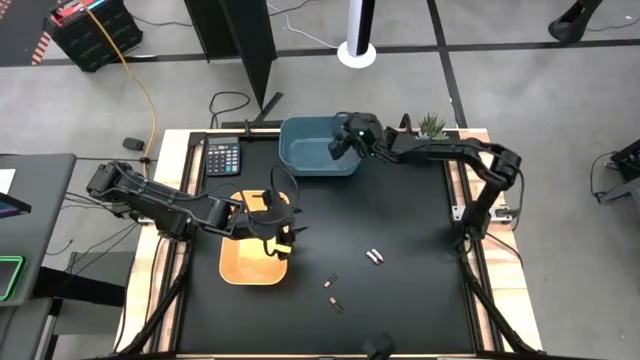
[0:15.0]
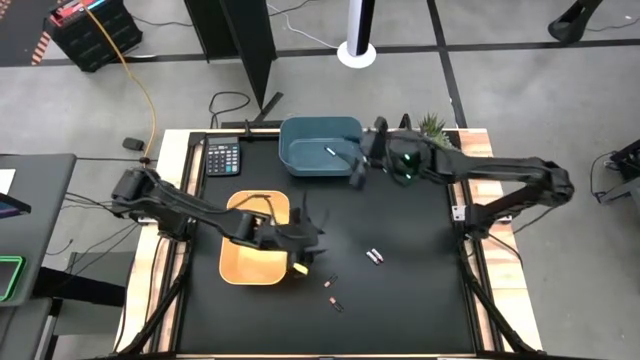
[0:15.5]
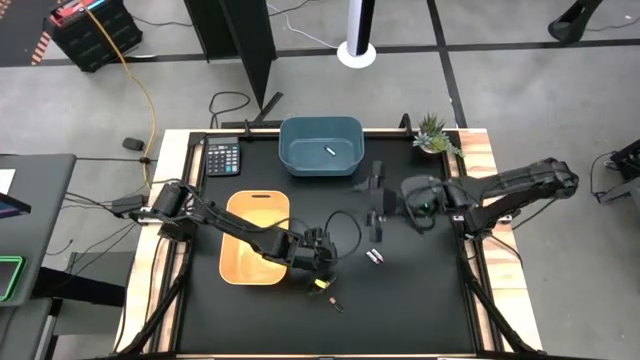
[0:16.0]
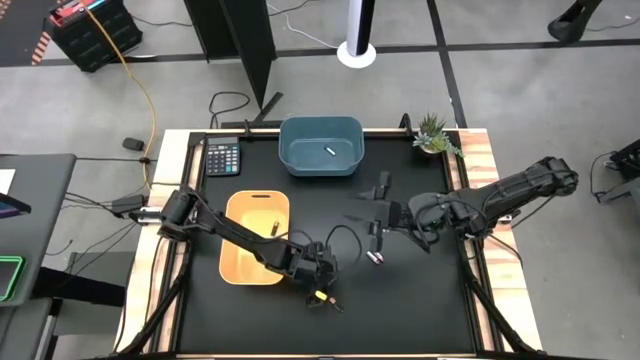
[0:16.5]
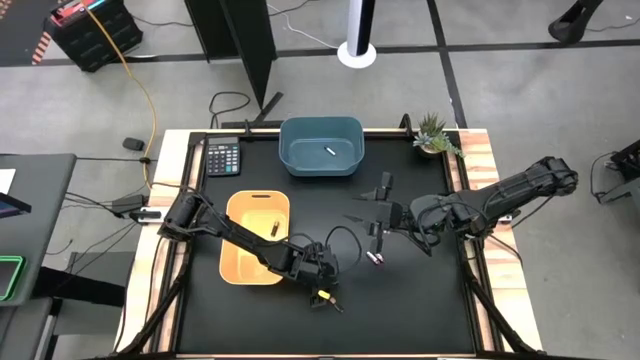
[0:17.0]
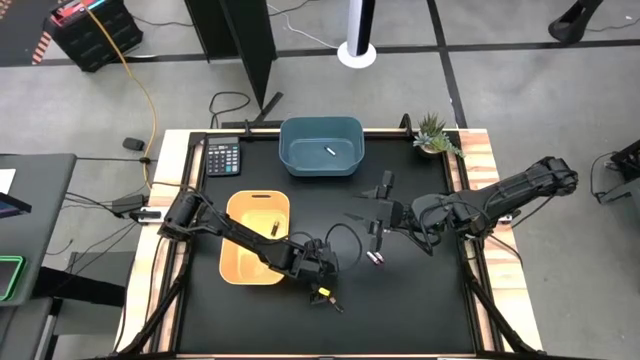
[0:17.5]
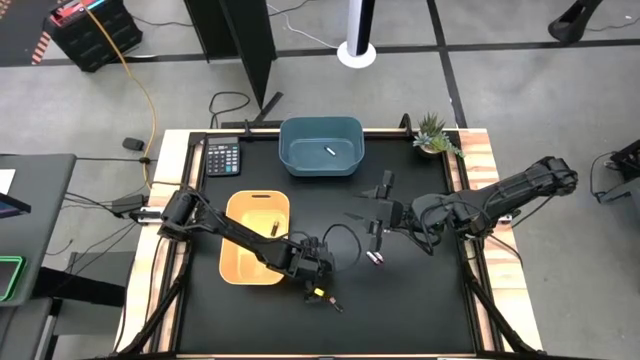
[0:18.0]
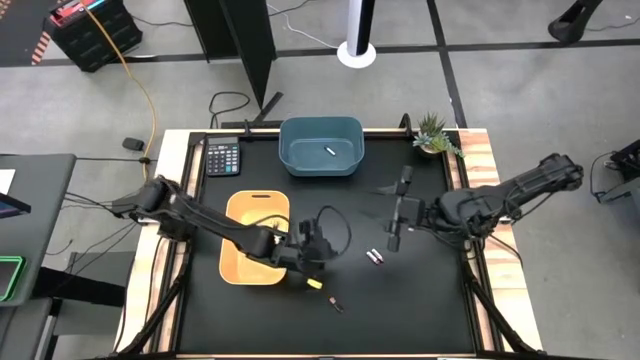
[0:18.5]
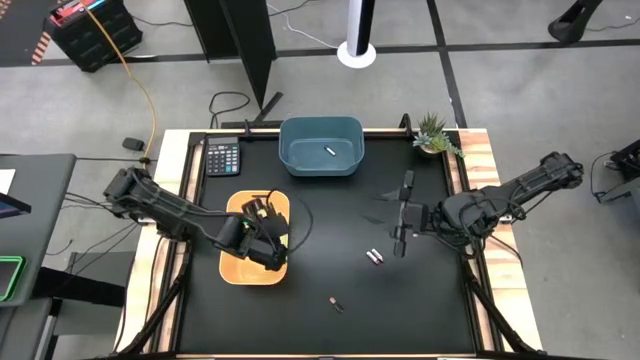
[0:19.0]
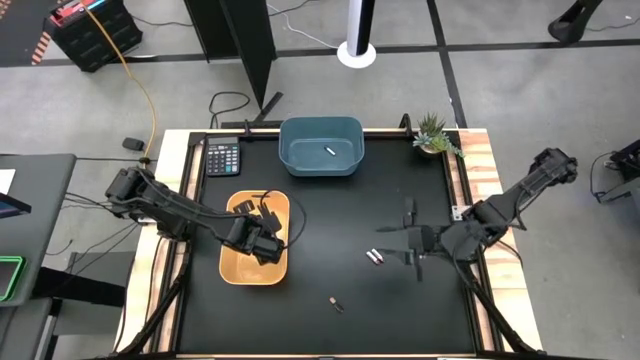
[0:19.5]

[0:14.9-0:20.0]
Task: Sort batteries
Put the top black battery into the orange bin

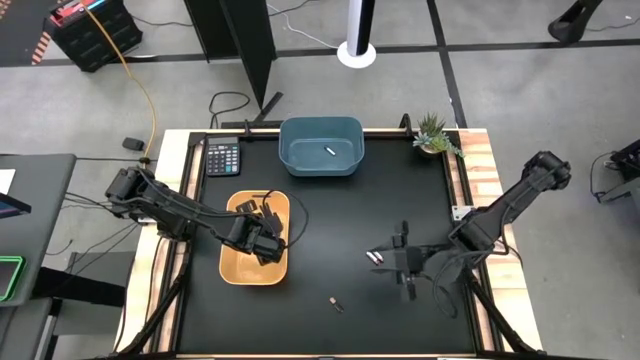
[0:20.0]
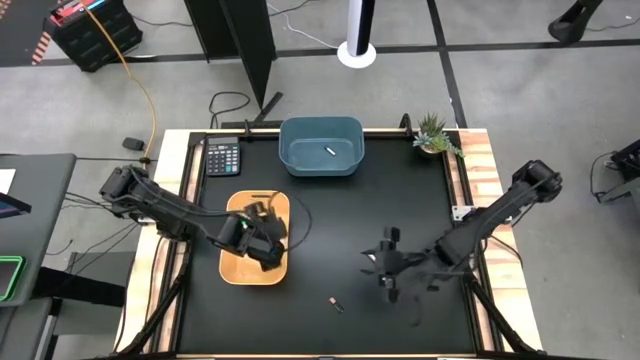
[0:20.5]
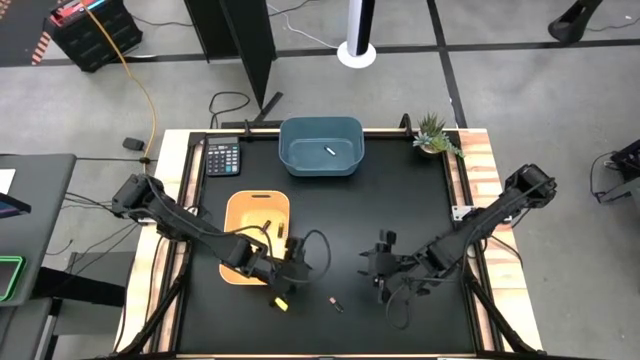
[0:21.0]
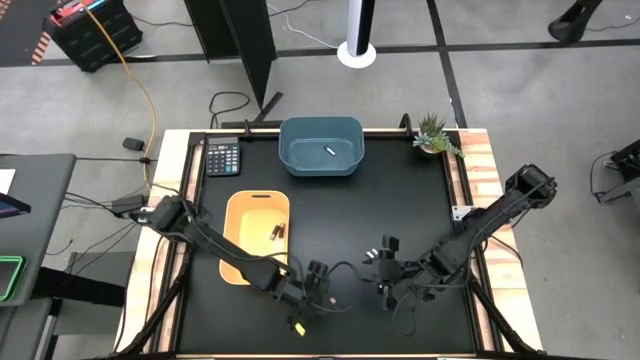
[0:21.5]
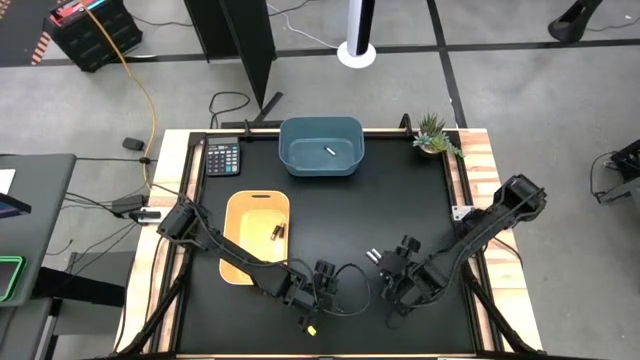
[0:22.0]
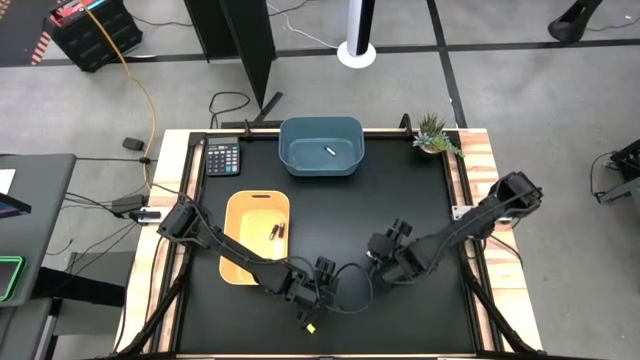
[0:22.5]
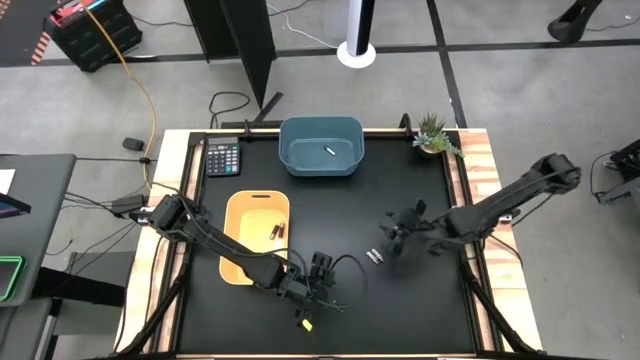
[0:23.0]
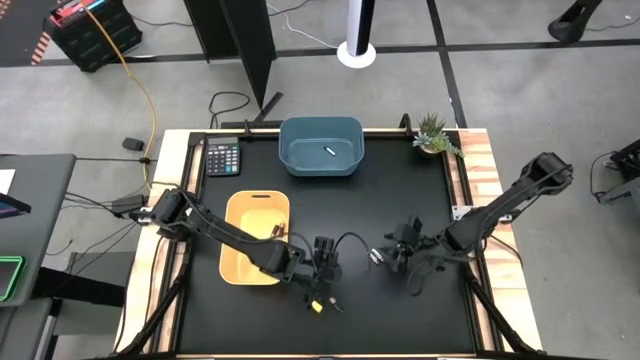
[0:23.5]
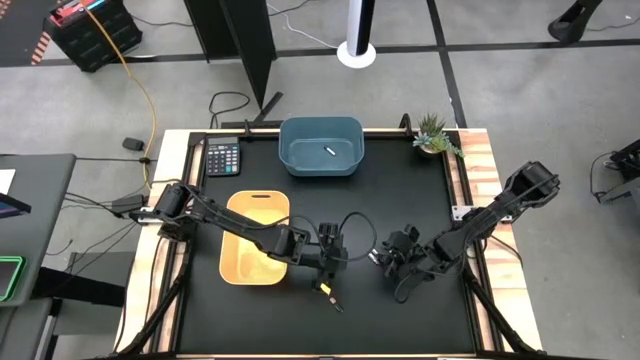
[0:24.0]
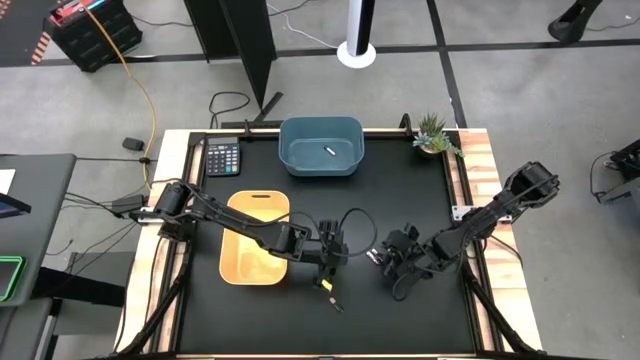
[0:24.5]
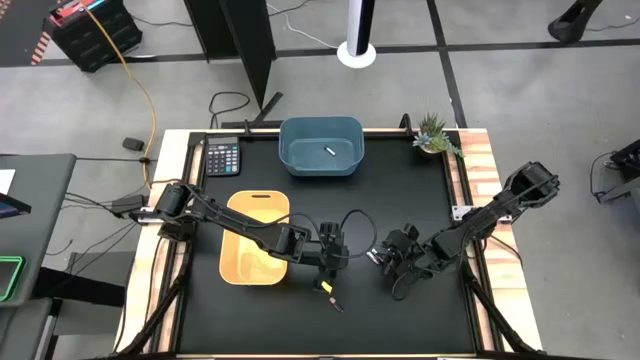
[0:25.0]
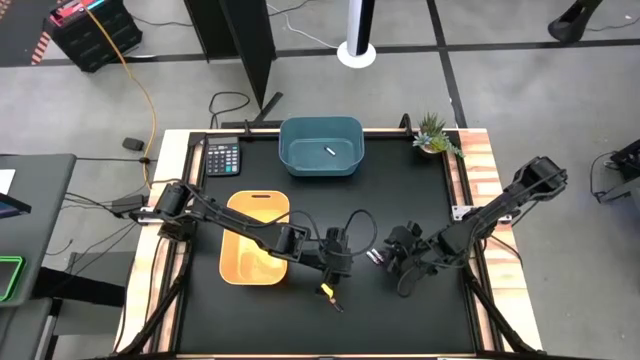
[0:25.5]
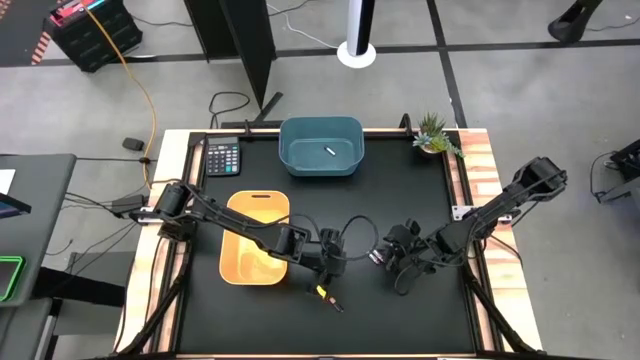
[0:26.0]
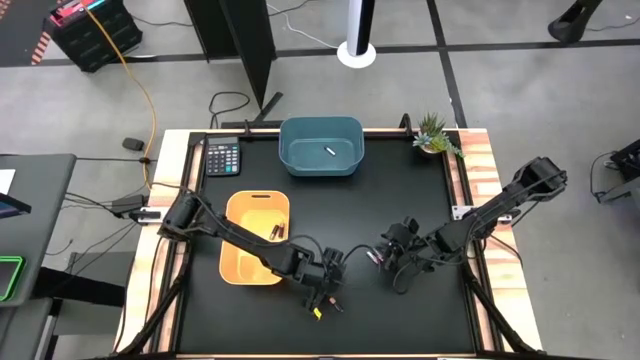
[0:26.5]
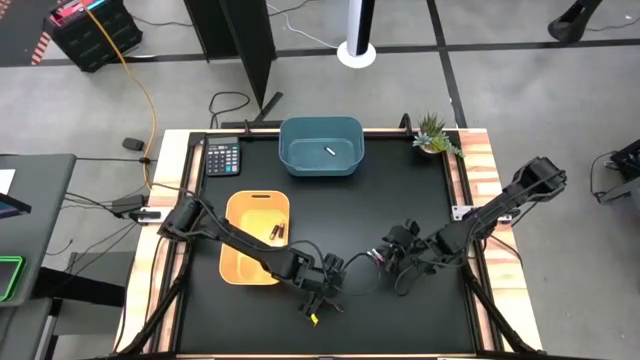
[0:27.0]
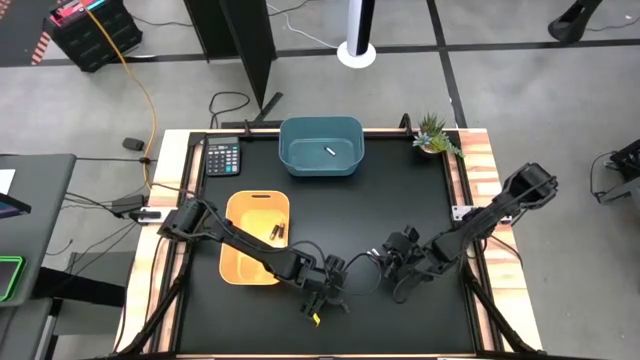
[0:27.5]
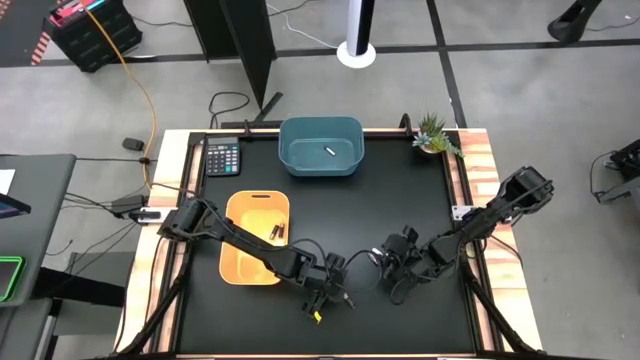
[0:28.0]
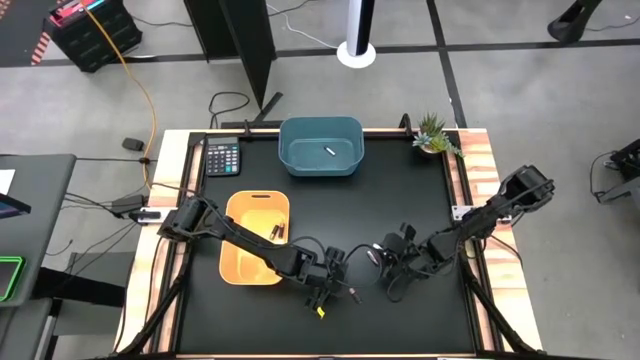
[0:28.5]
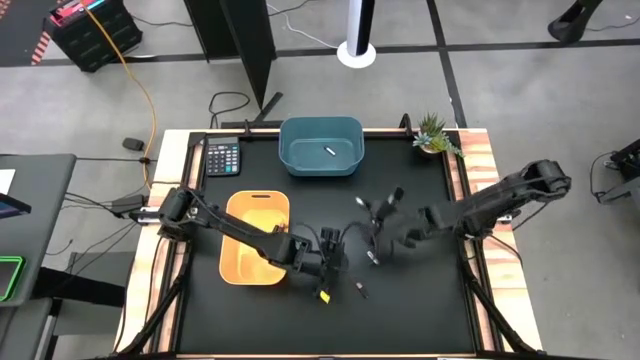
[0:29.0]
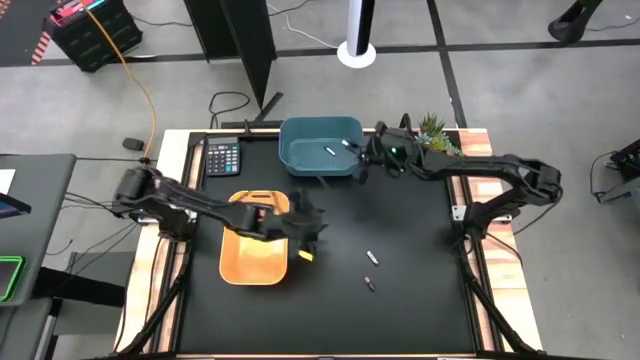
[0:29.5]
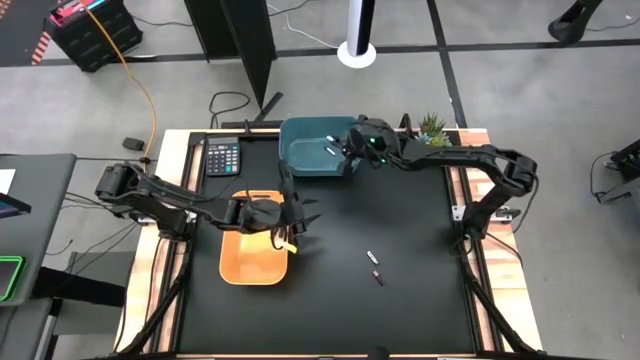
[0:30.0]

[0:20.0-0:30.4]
Put the top silver battery into the blue bin

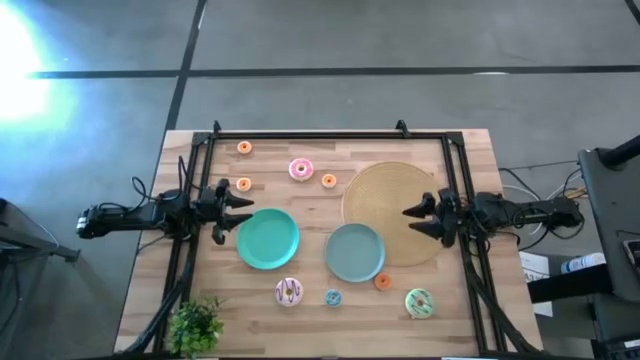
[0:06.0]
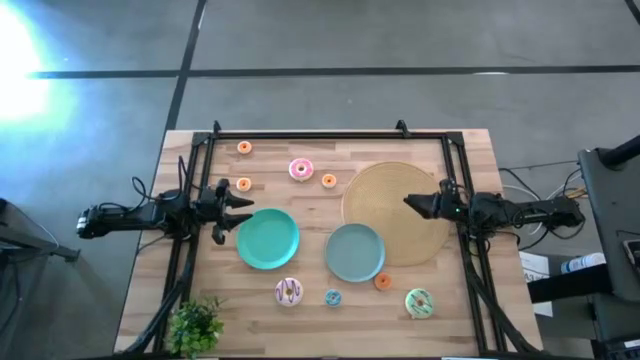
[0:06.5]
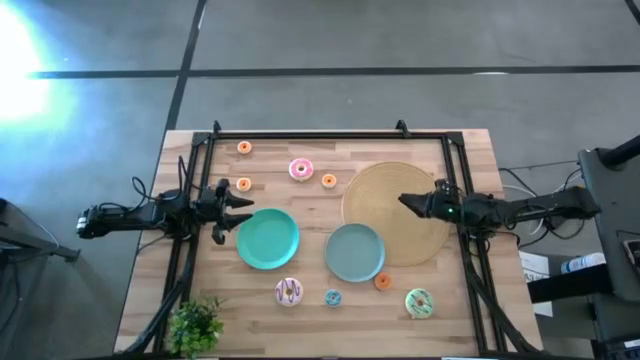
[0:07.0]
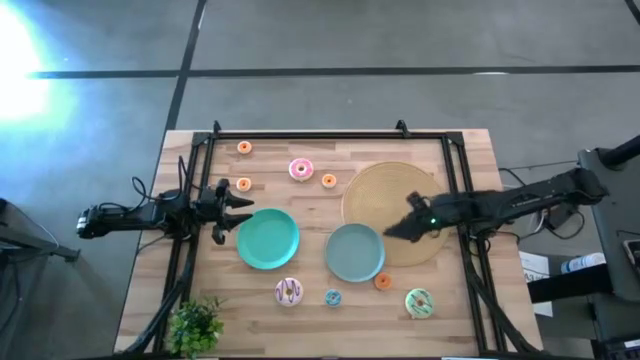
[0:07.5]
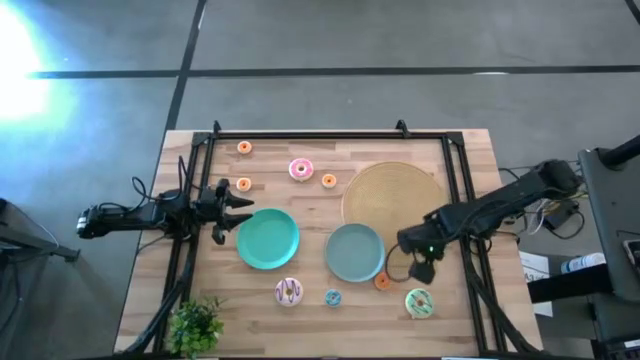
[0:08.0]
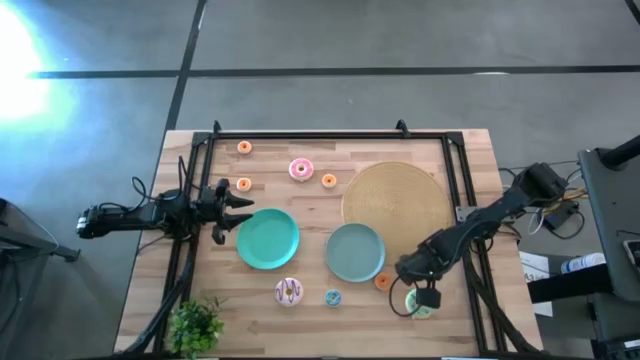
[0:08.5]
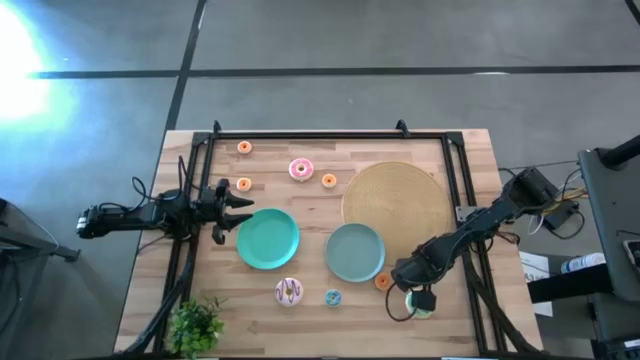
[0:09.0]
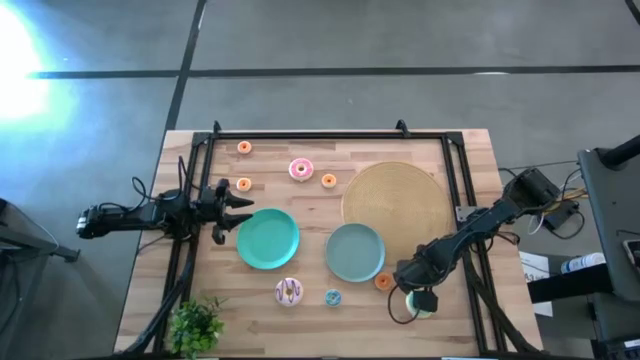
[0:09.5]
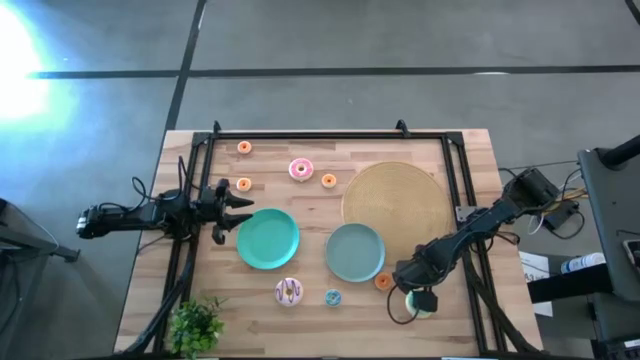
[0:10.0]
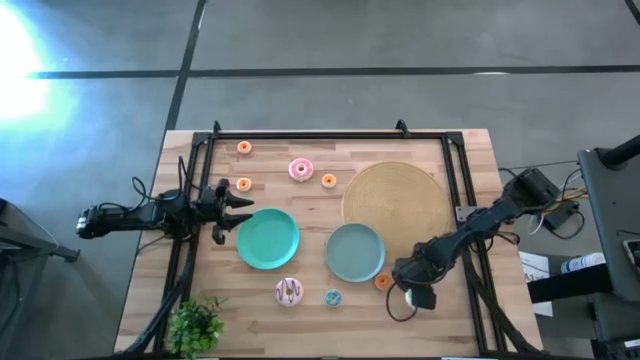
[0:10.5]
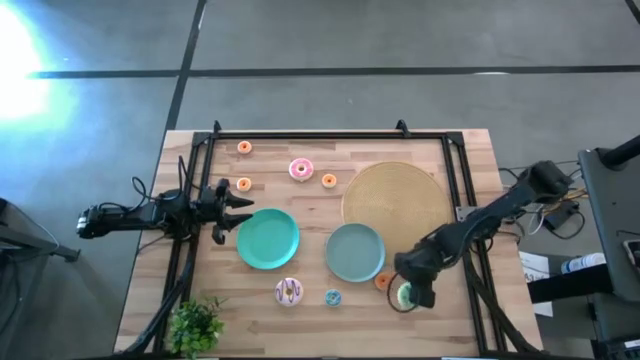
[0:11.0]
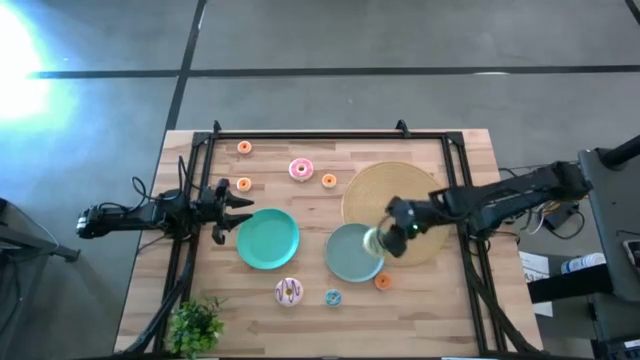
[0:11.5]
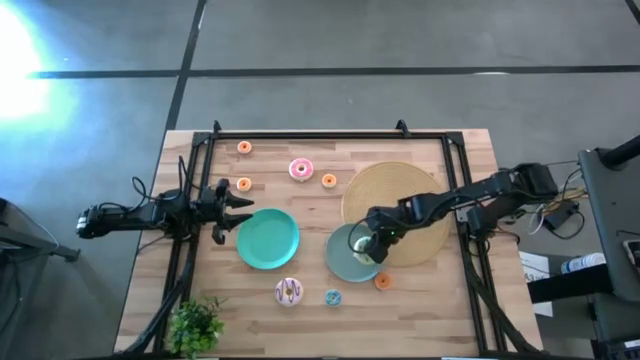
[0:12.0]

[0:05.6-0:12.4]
Task: Pick & Place donuts
Put the big green donut on the gray plate
